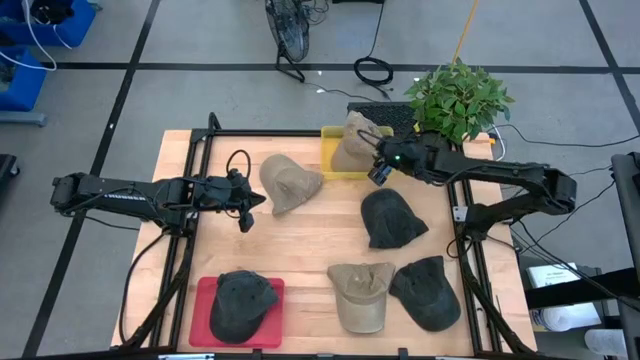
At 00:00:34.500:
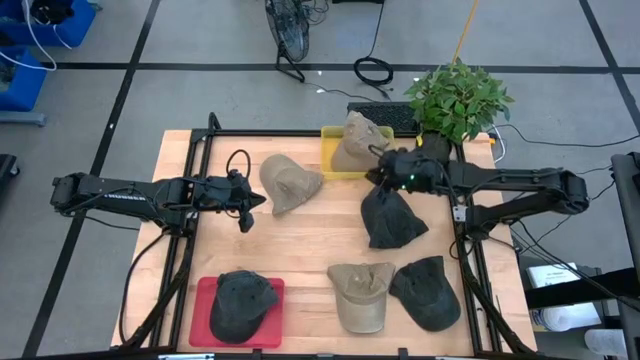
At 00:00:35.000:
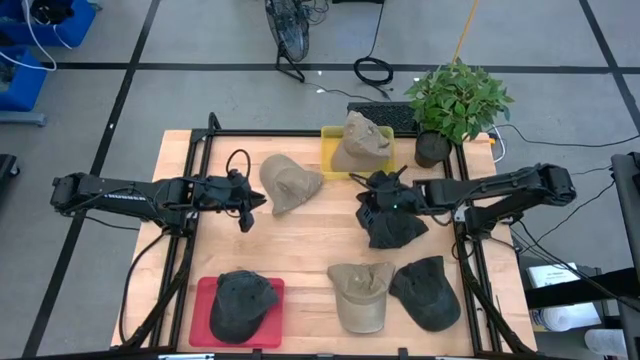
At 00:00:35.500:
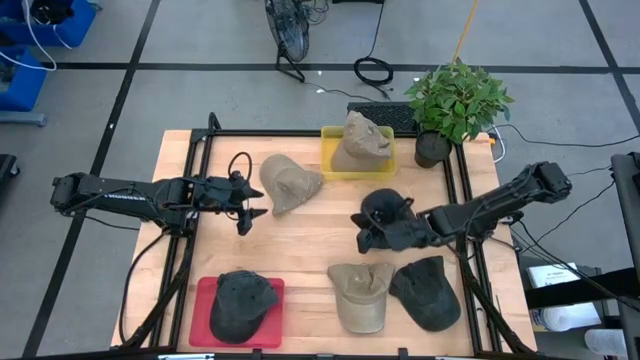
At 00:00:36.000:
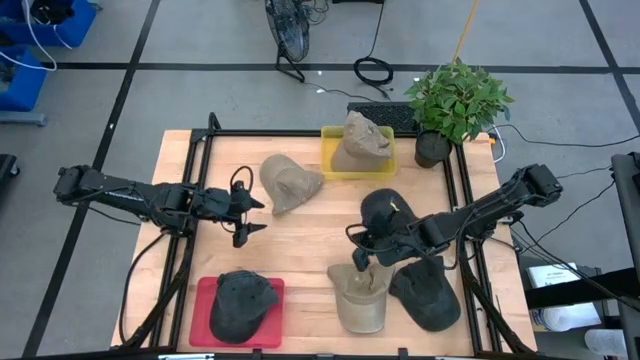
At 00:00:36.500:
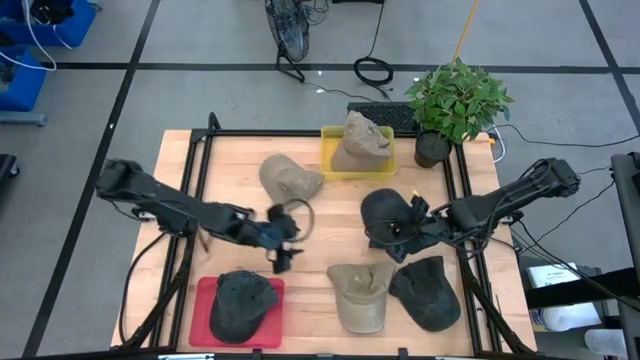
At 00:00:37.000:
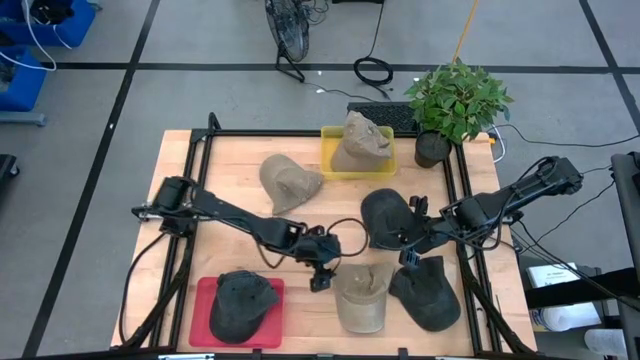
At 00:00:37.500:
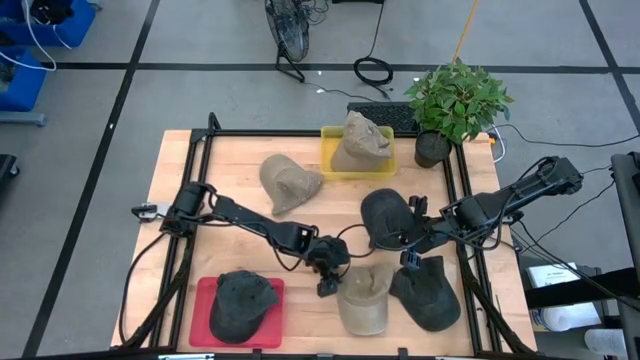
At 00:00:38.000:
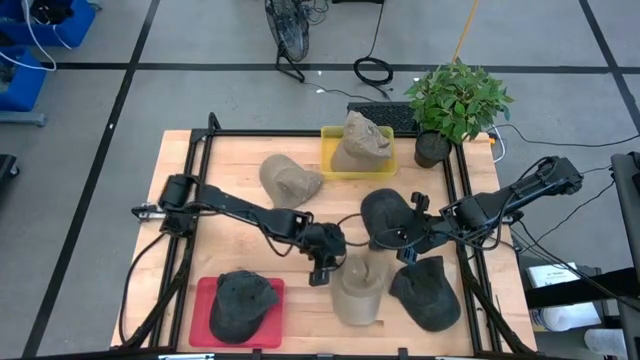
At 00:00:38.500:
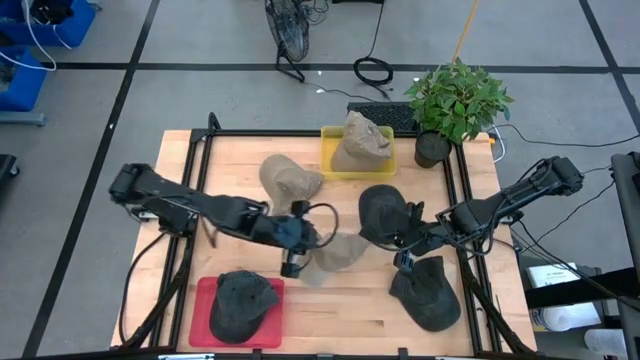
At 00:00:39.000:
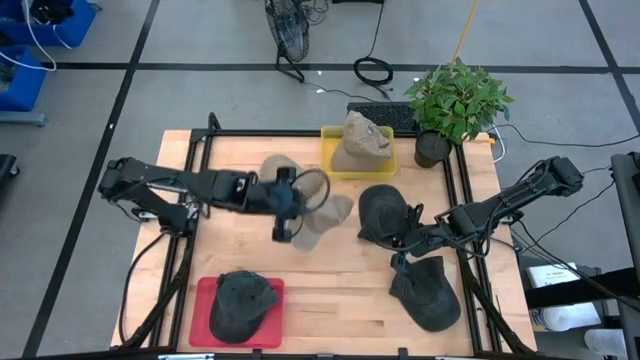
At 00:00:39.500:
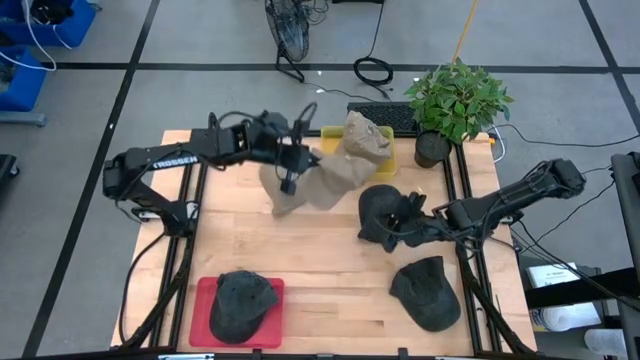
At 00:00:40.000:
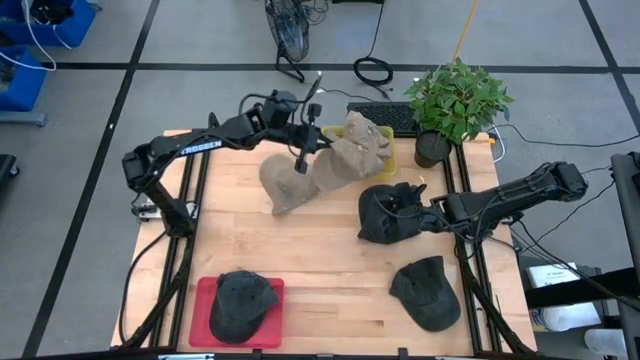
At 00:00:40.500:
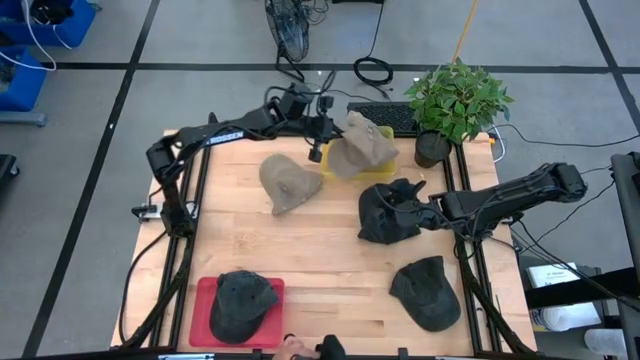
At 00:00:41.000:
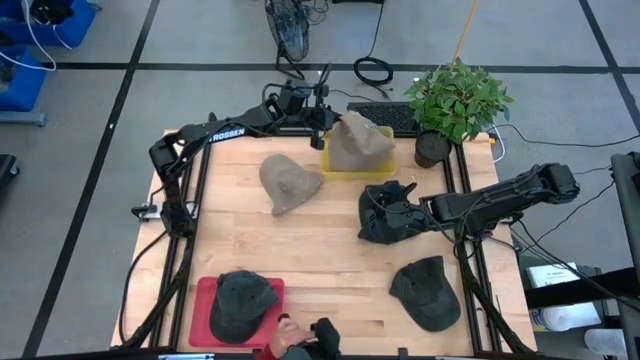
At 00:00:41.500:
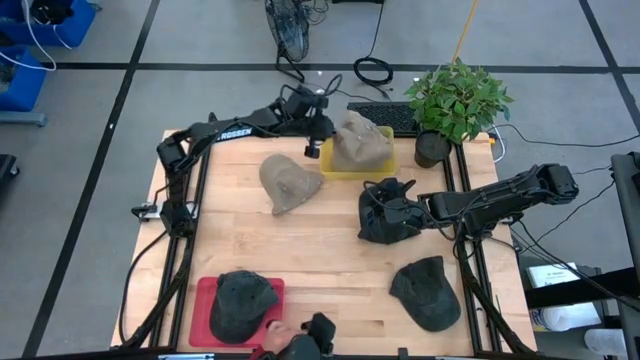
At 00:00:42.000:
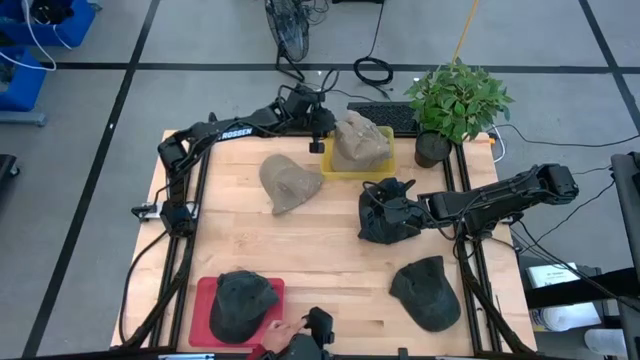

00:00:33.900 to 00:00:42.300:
Task: Pick & Place hat
Put the brown cap into the yellow bin

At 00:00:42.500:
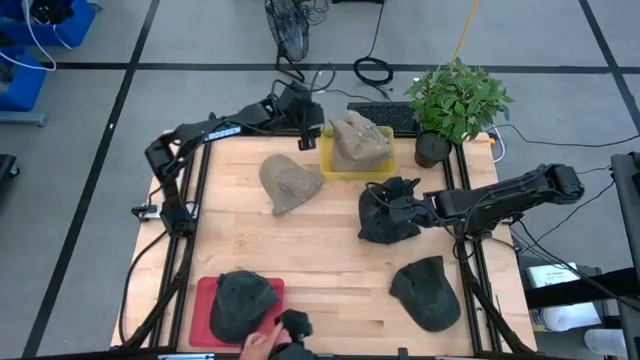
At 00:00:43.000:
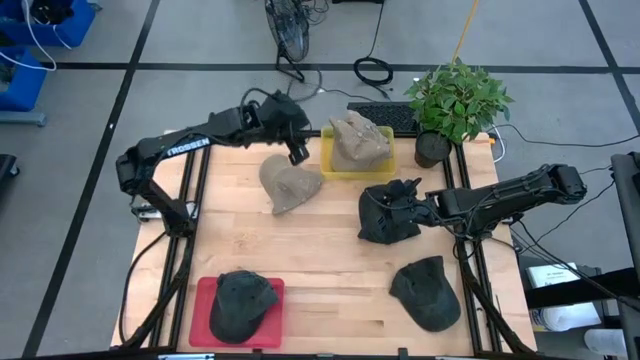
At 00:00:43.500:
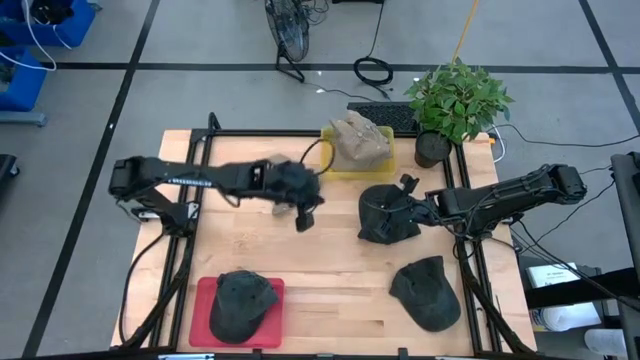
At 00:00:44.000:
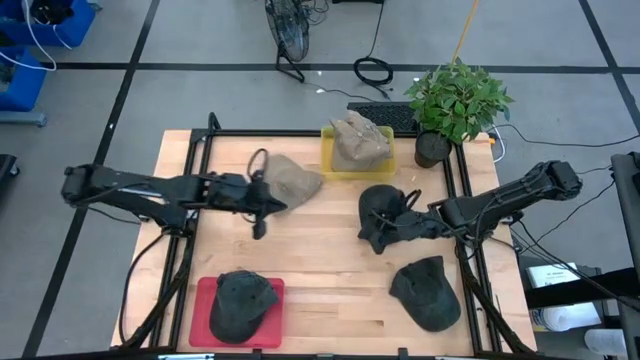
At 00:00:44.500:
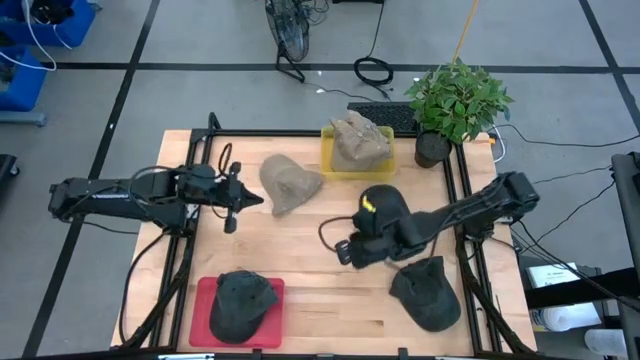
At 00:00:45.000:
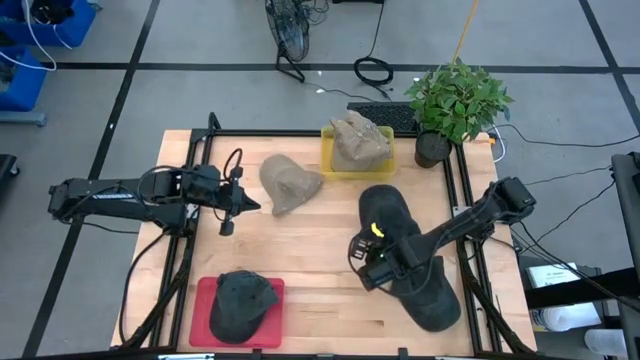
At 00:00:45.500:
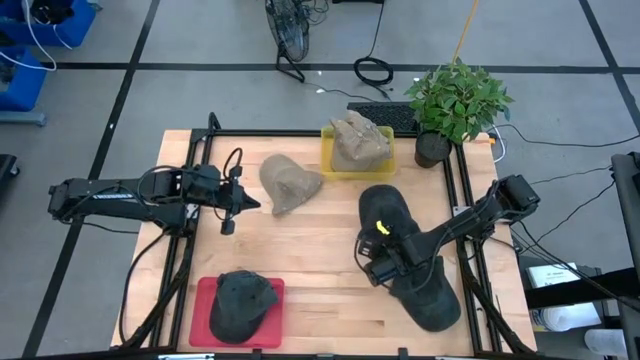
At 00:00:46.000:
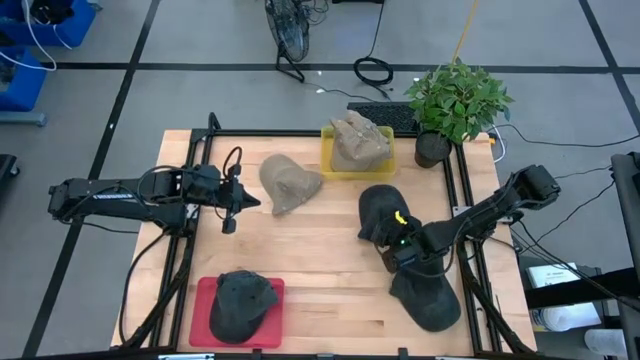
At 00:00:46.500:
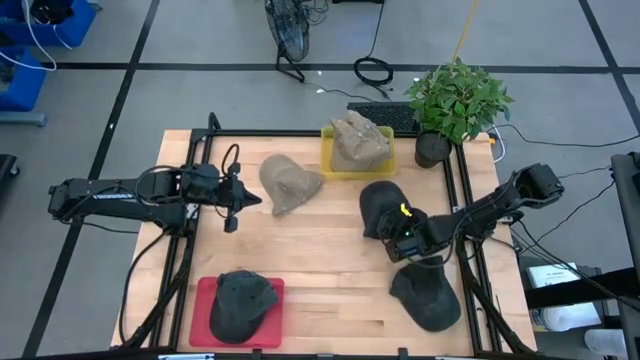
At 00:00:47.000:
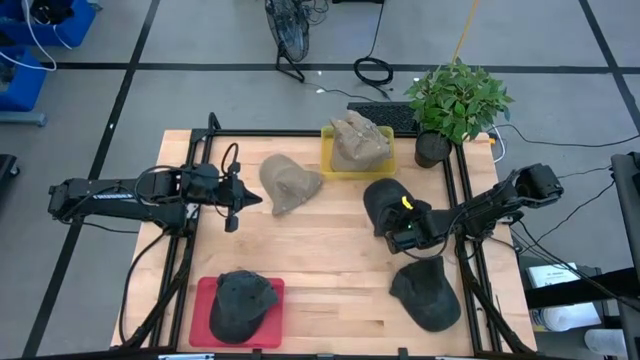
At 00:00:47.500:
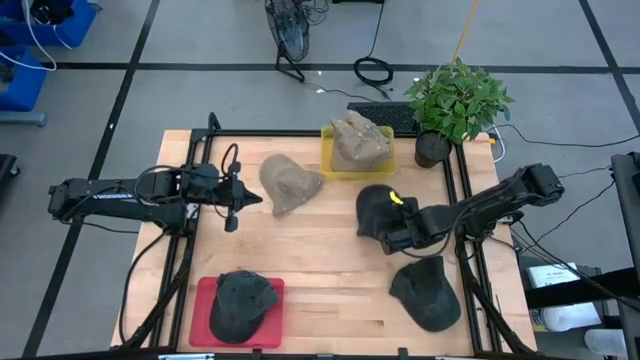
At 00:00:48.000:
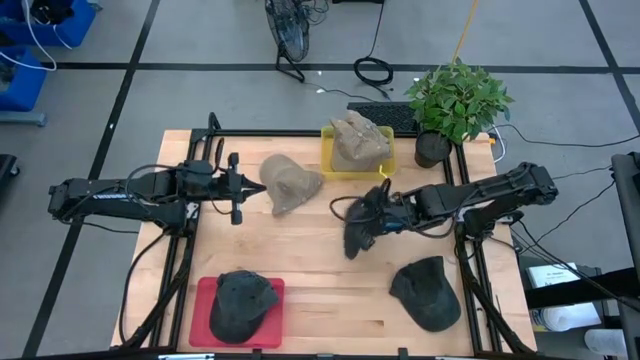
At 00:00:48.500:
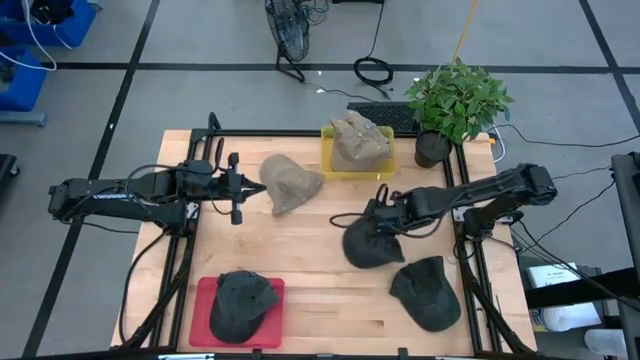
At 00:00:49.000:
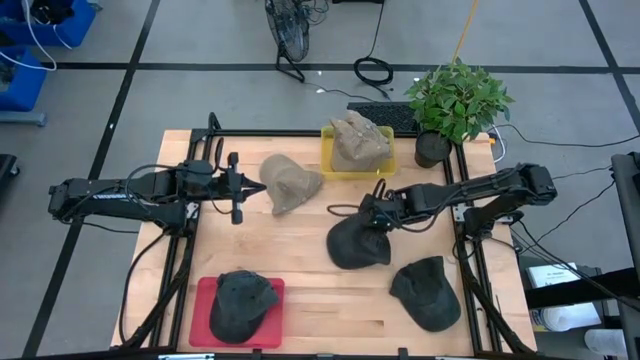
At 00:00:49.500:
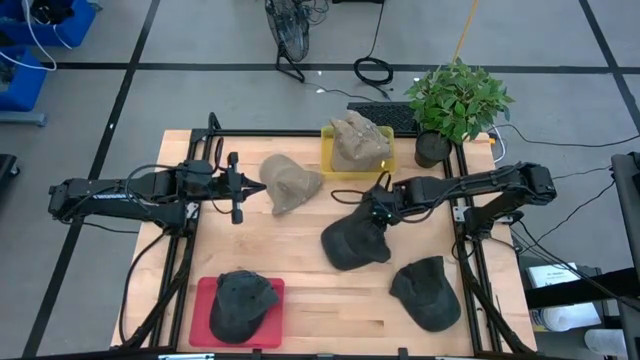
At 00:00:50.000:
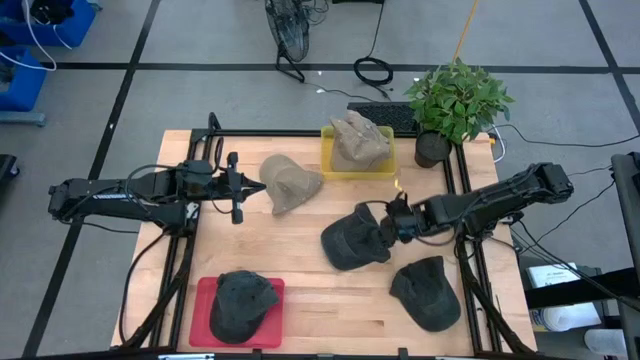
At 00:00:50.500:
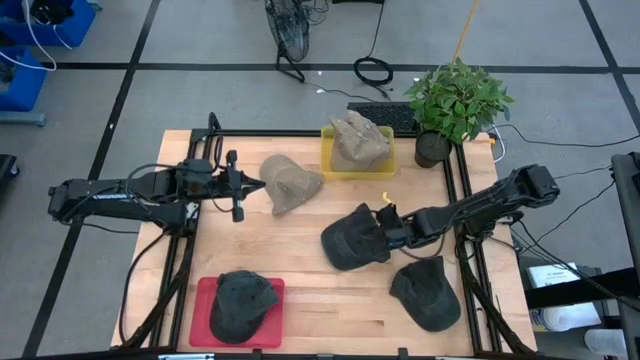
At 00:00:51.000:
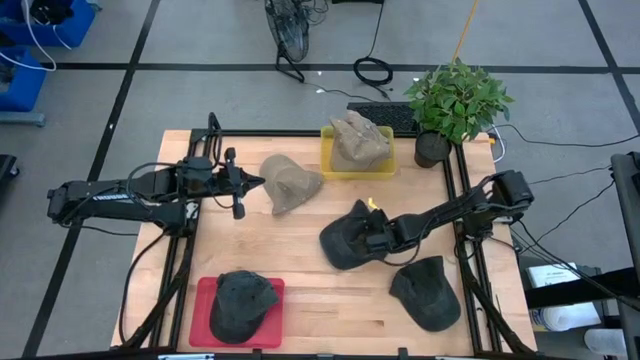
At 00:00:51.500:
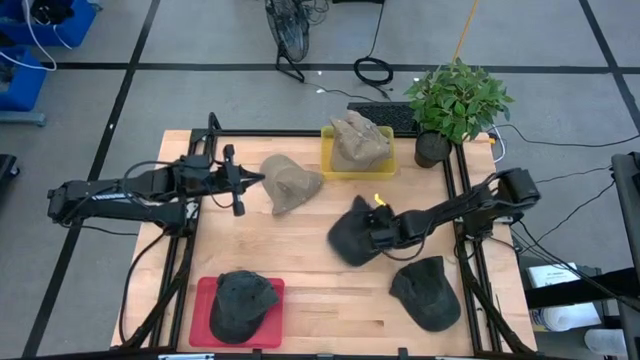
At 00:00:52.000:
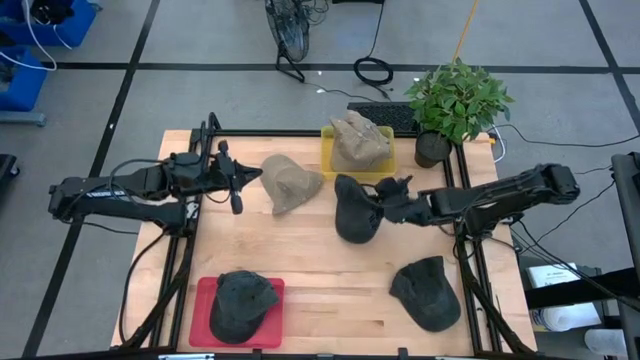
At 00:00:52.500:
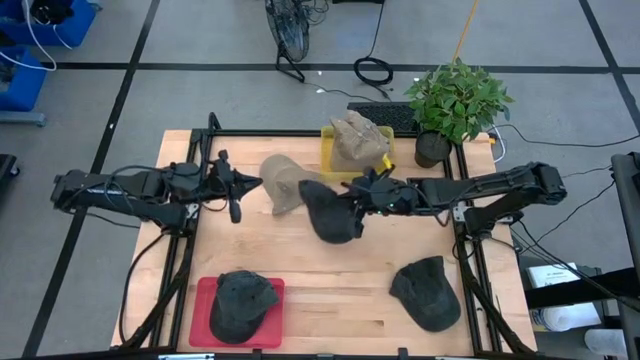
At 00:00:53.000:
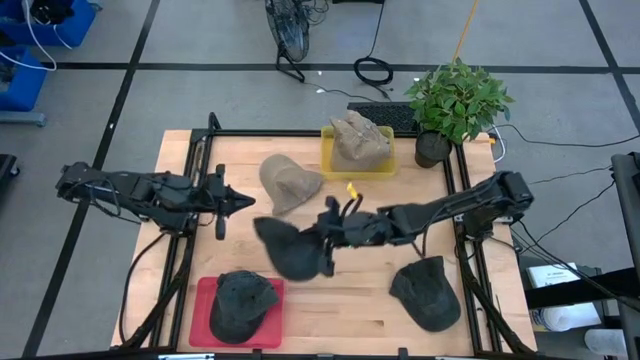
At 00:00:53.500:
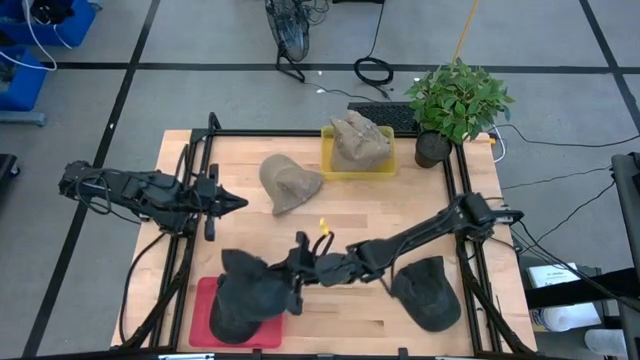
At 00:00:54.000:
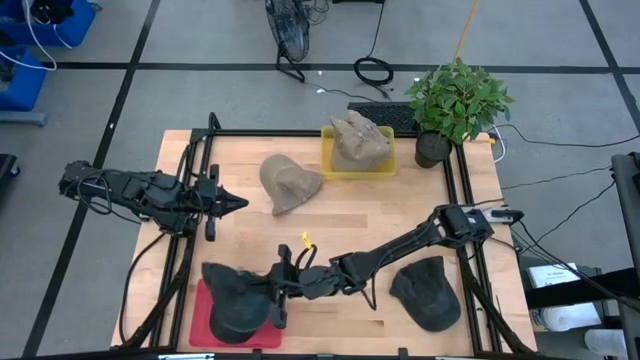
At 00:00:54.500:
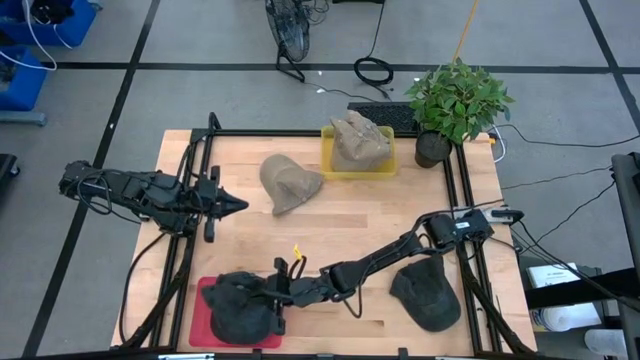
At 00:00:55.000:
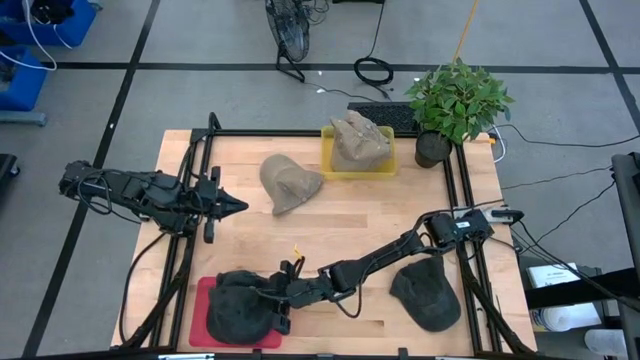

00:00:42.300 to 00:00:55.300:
Put the black cap into the red bin
